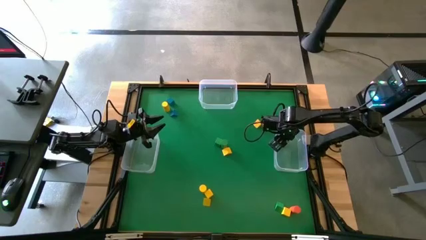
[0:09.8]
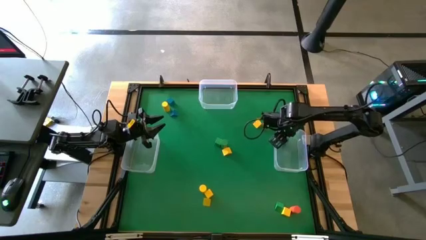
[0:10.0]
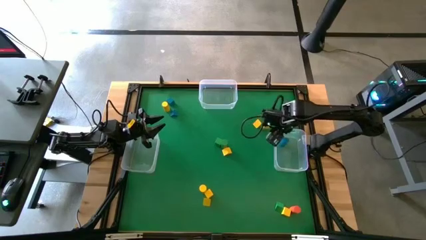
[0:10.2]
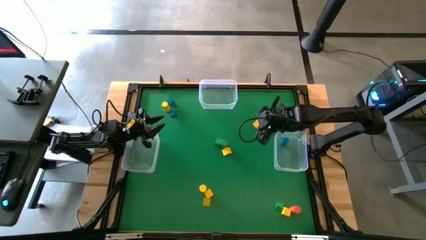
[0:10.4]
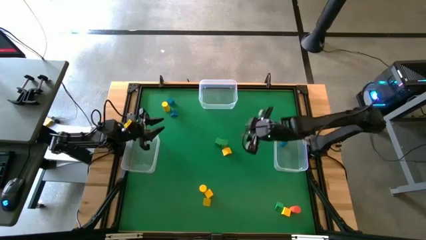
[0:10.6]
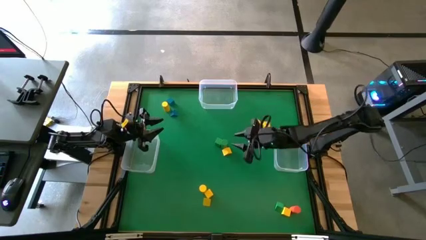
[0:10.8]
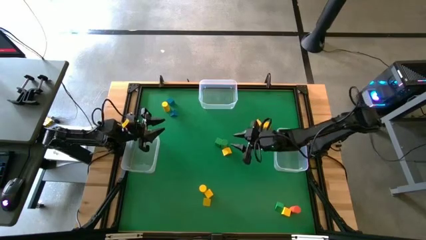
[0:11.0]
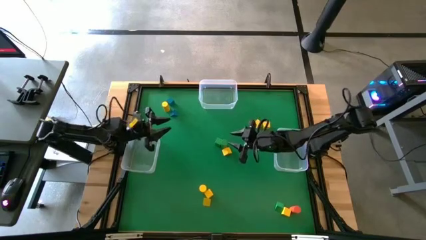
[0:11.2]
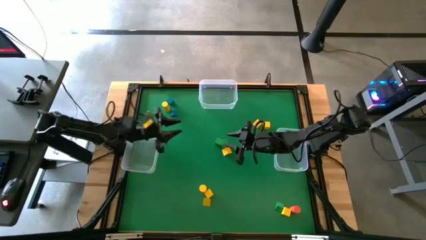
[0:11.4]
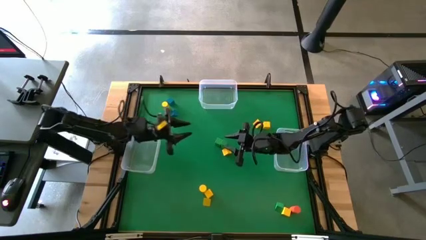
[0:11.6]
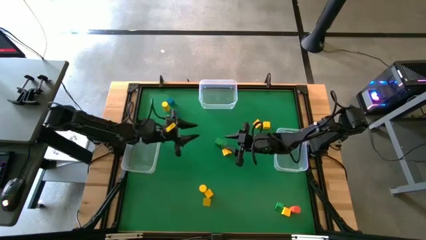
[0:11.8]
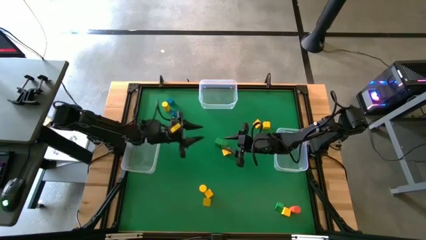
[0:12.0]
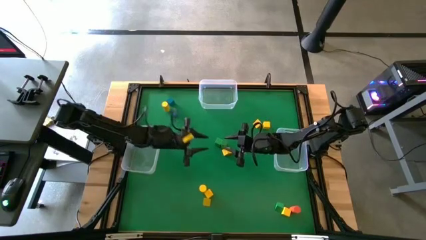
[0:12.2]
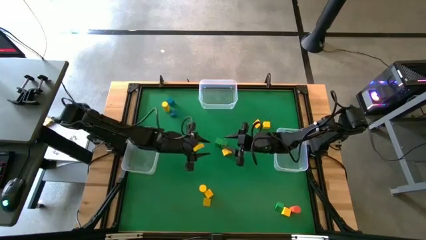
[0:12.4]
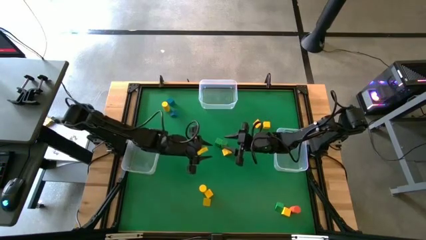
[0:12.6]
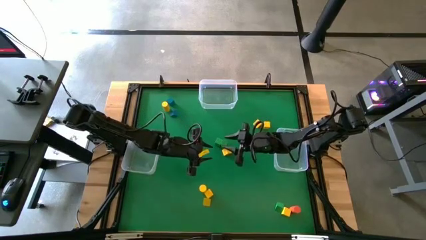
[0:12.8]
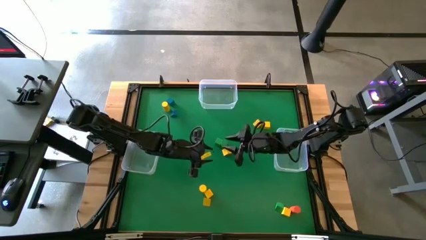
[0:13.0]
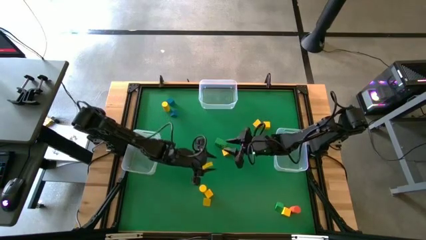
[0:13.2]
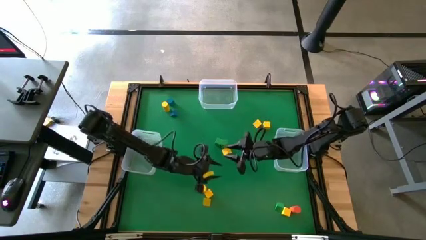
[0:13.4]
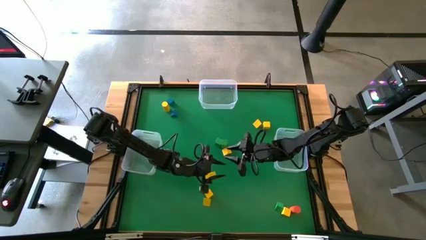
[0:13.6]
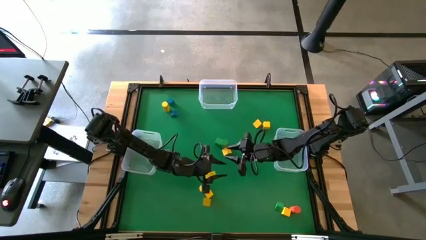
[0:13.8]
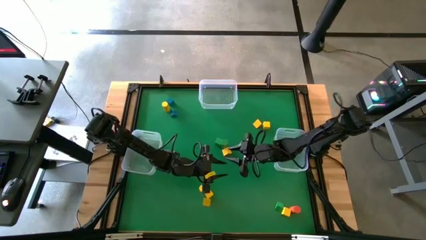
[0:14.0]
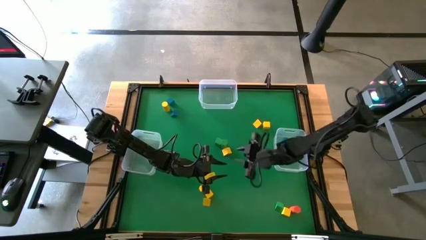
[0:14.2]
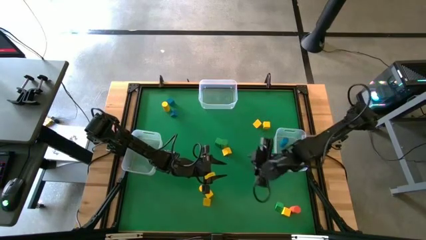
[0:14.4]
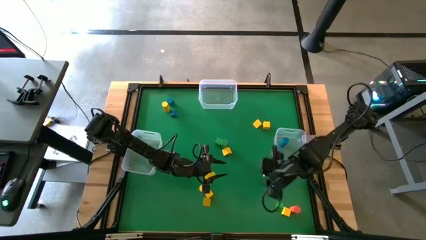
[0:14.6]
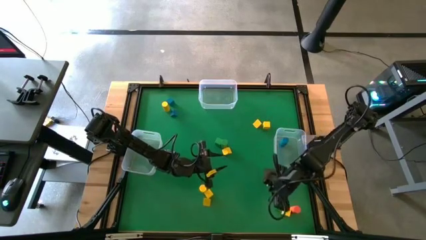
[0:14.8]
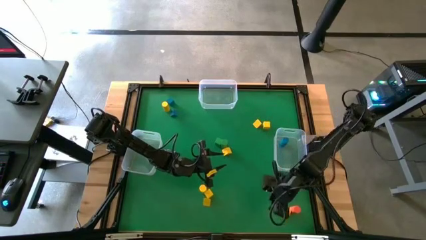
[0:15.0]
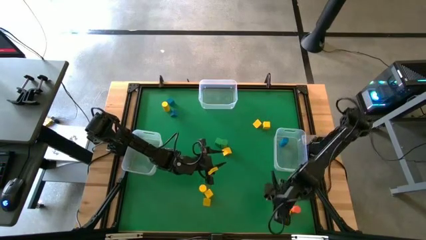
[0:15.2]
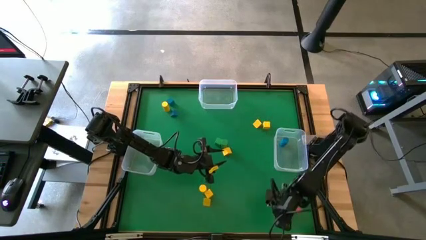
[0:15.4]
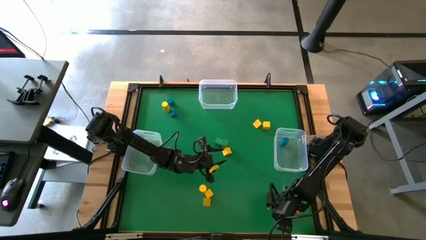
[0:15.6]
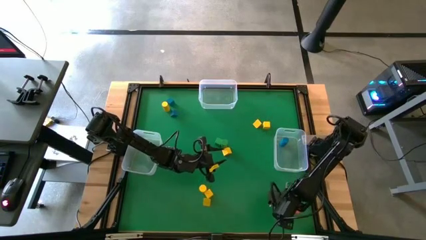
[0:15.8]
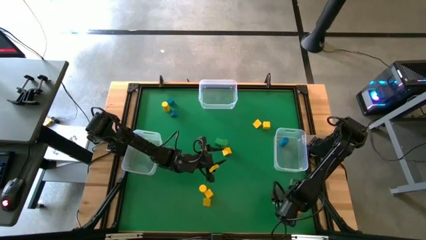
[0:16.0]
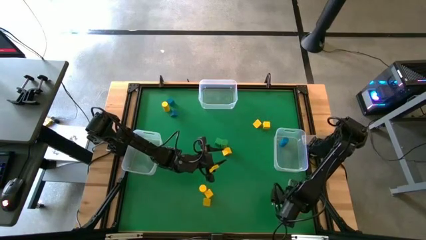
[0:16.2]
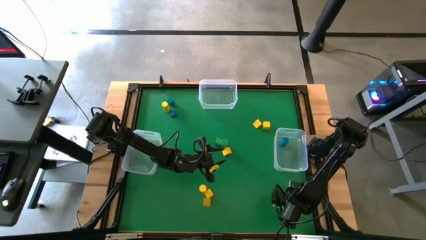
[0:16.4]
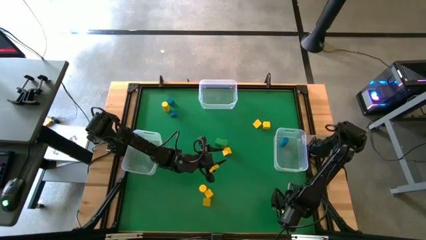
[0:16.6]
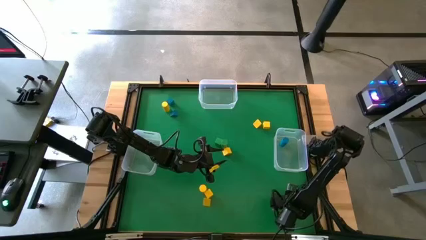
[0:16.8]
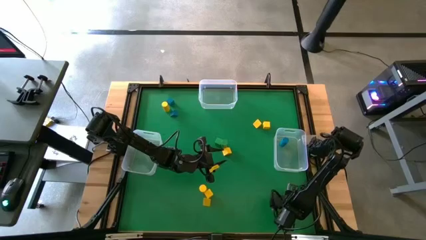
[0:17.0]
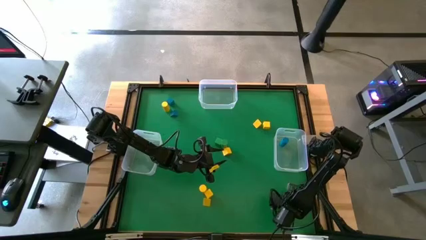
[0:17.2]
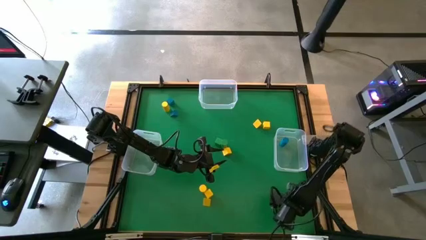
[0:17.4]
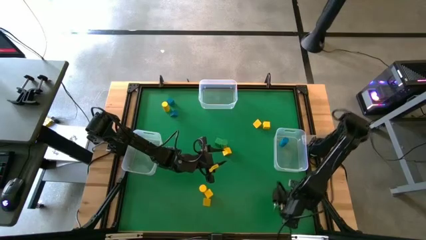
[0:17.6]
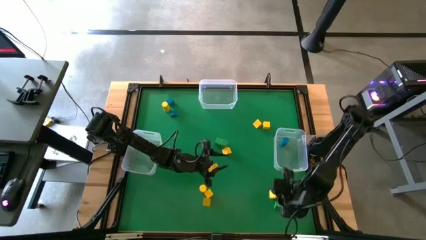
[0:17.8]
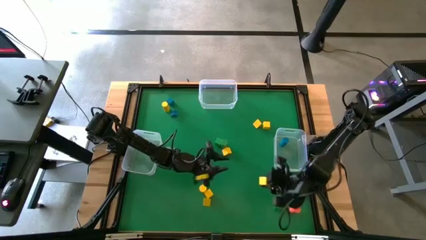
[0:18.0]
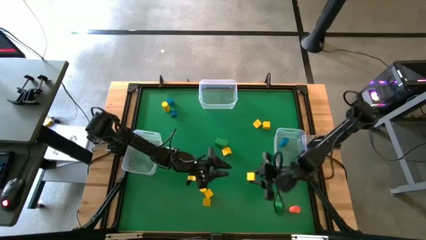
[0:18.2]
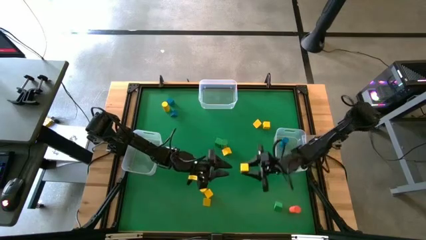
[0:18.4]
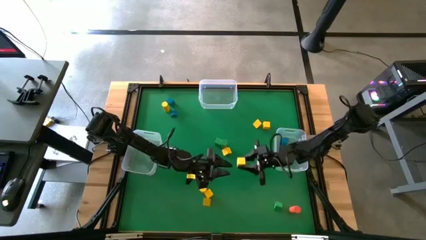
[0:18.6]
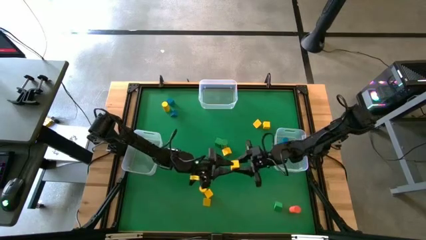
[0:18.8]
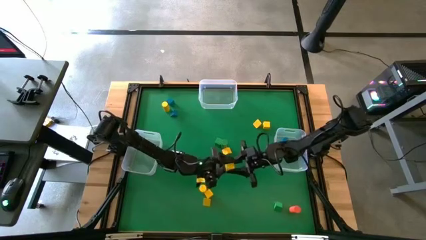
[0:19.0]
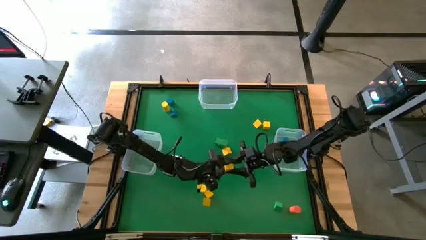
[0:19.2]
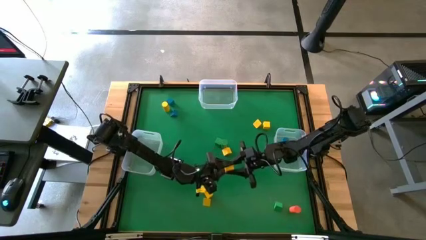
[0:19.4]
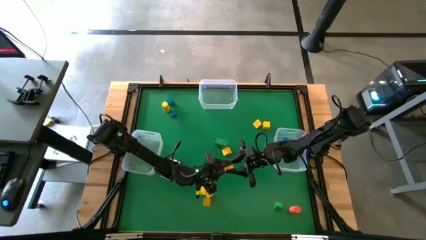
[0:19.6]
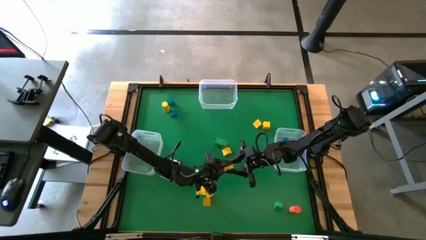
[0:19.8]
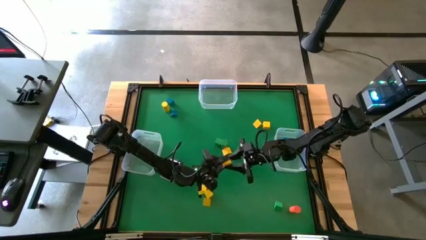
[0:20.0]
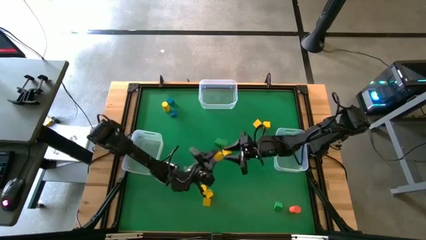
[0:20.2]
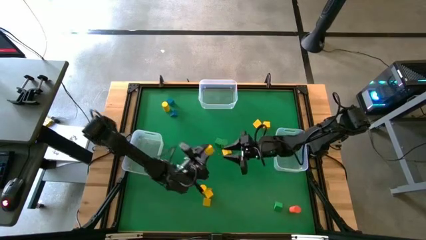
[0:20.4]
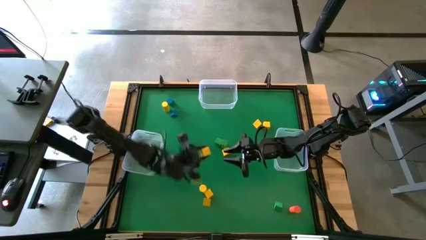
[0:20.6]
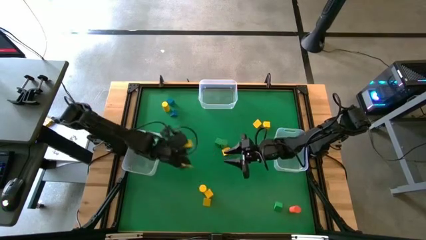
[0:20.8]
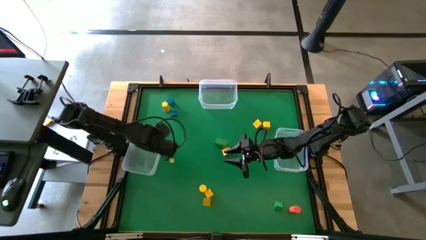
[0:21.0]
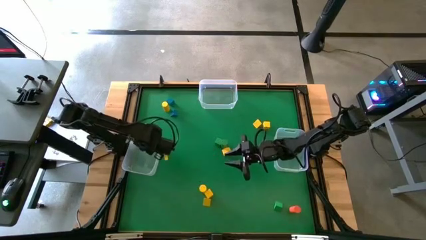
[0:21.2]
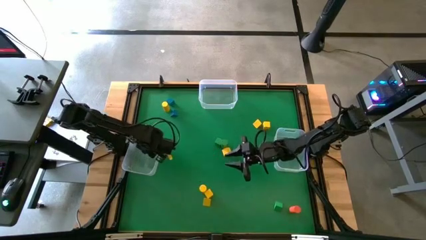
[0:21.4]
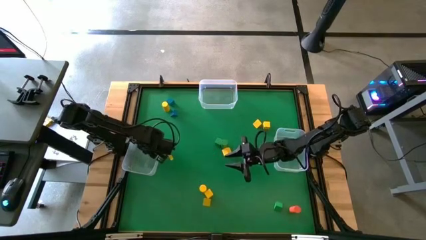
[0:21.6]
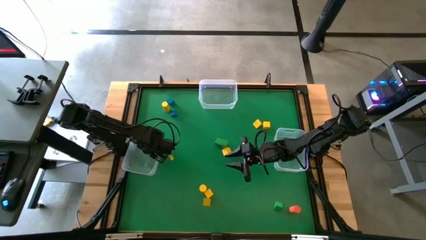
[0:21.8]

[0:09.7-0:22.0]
Task: Sort blocks by size
Put the yellow square block into the left transparent bin

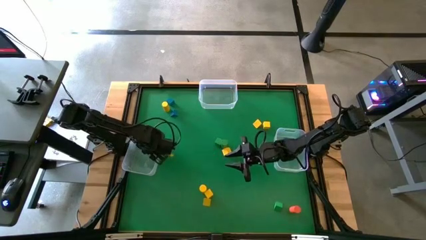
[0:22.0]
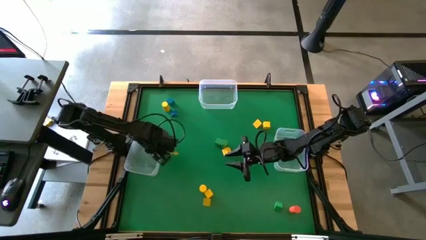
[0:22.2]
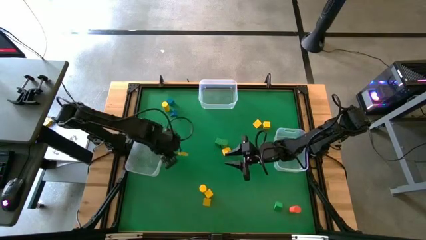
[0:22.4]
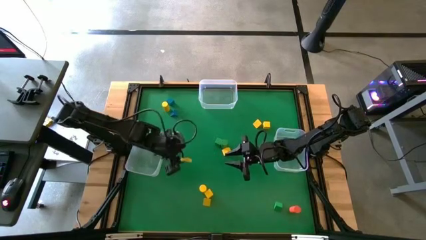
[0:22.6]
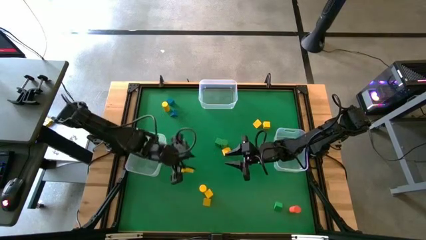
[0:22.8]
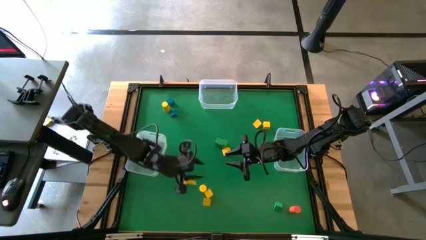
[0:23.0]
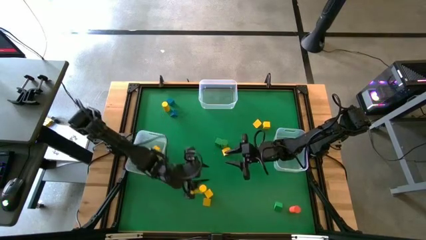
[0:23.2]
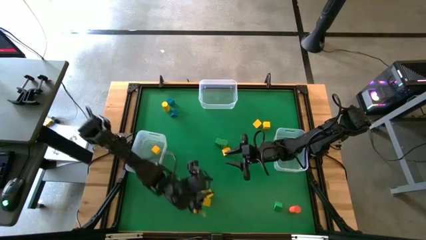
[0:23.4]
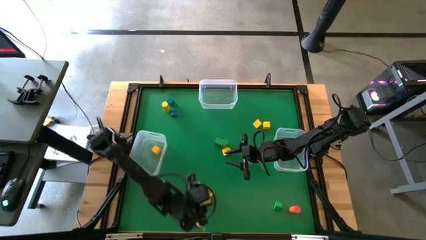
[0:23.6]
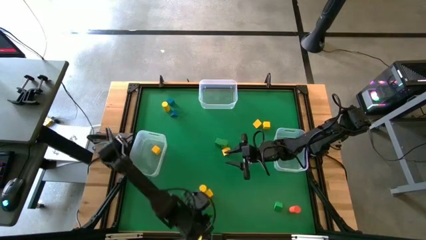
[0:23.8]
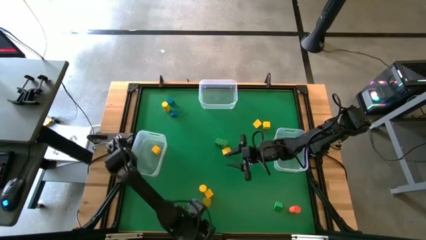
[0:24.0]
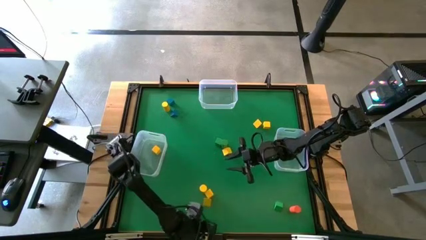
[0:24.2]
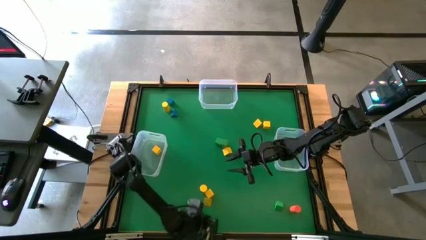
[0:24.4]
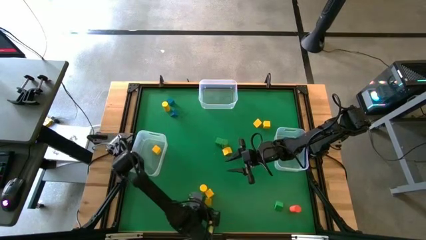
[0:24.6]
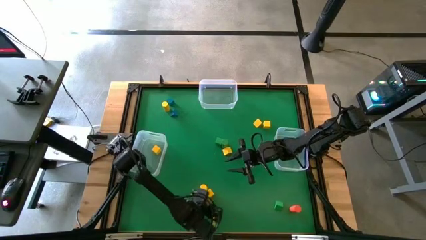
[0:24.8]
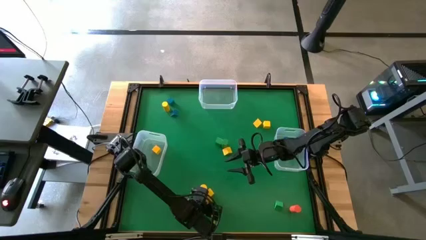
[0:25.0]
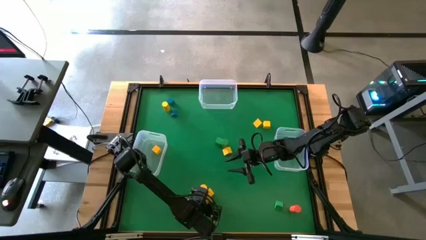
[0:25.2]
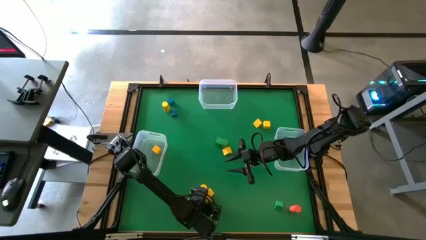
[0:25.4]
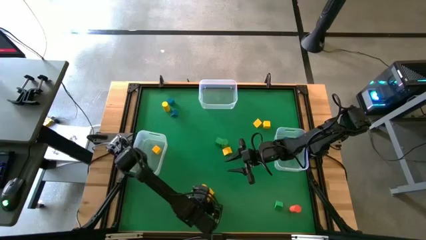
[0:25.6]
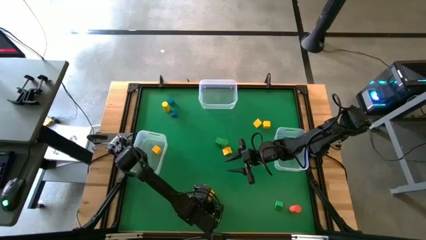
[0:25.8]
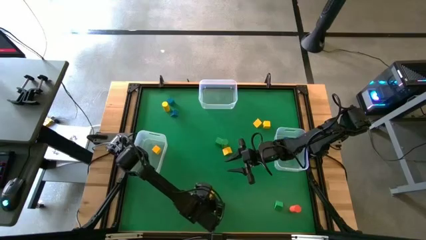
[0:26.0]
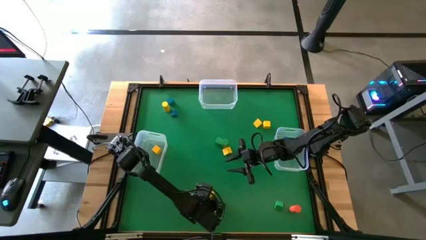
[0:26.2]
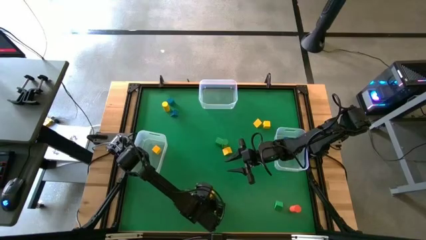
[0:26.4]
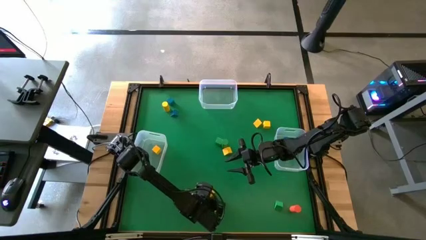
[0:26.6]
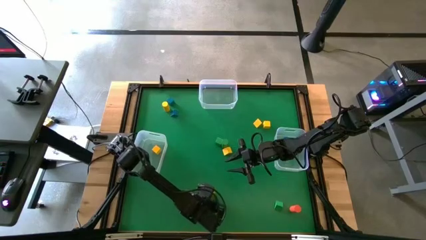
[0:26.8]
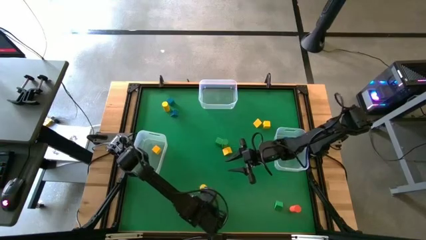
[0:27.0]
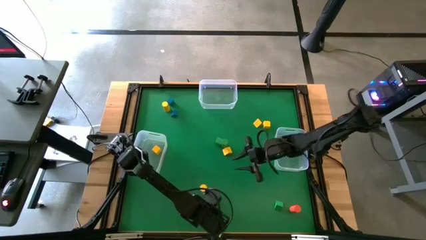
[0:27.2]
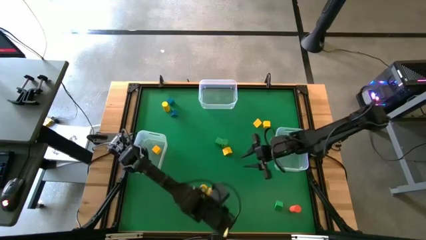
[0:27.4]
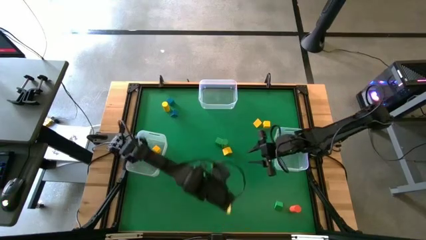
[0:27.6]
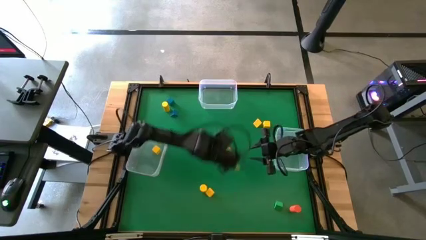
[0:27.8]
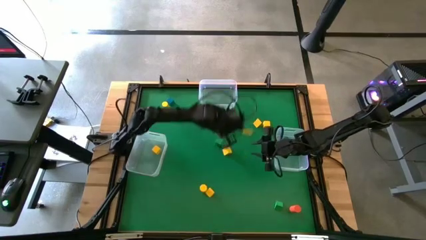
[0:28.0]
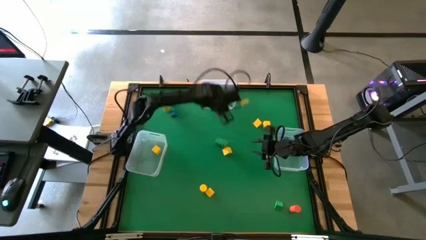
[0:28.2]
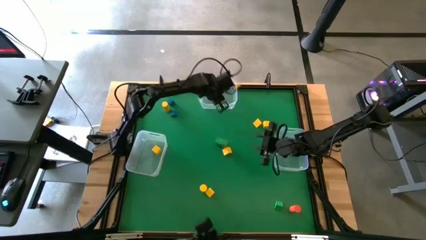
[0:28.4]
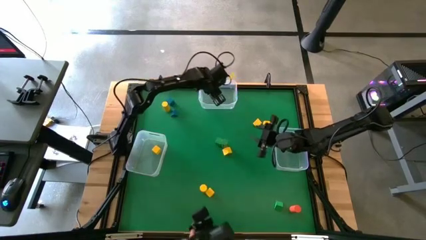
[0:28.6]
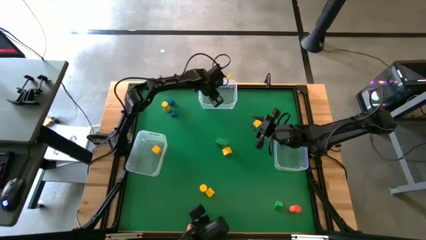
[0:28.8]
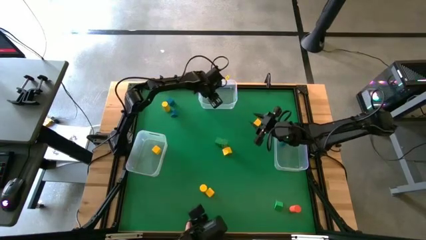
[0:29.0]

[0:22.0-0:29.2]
Put the yellow triangle block into the top transparent bin
